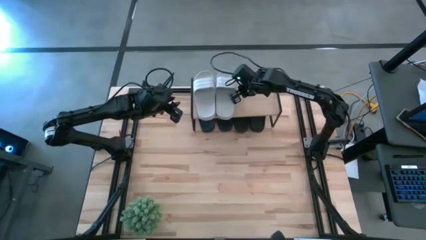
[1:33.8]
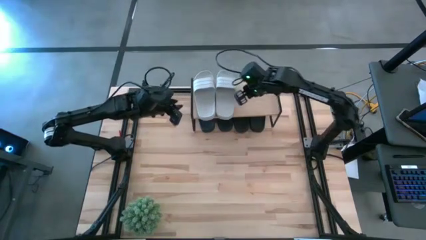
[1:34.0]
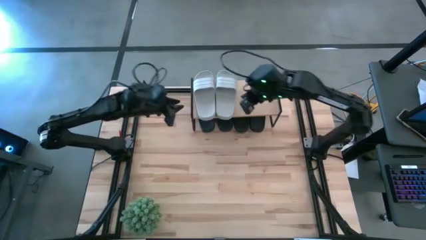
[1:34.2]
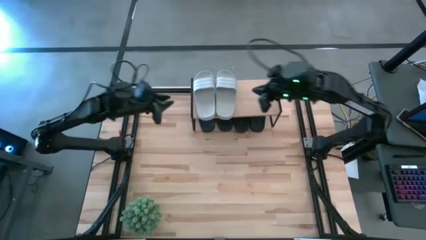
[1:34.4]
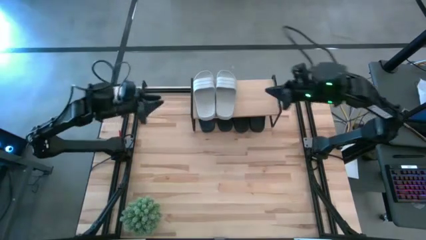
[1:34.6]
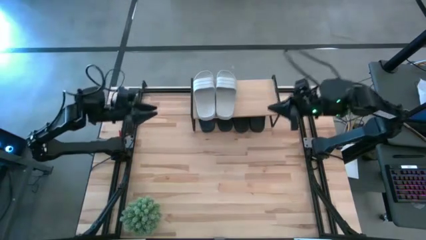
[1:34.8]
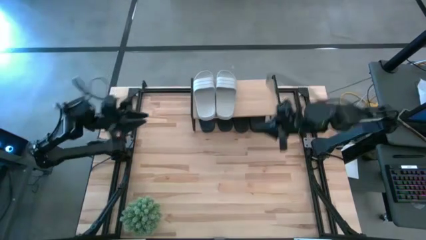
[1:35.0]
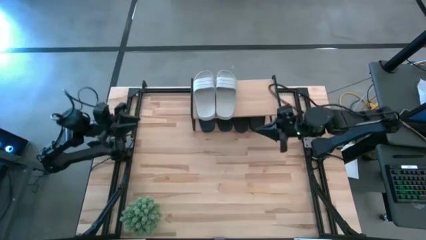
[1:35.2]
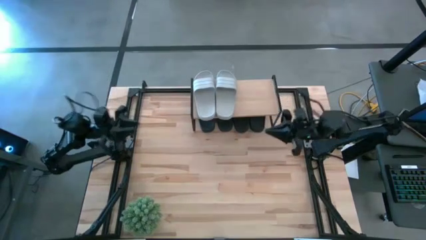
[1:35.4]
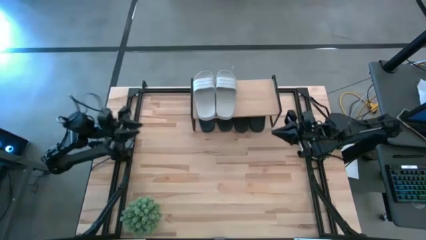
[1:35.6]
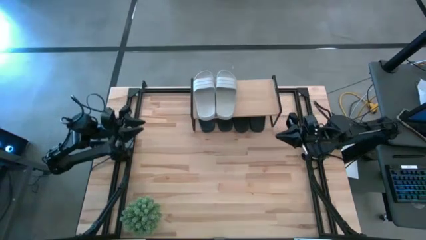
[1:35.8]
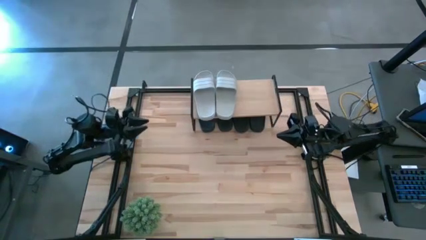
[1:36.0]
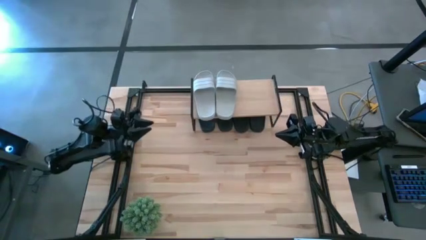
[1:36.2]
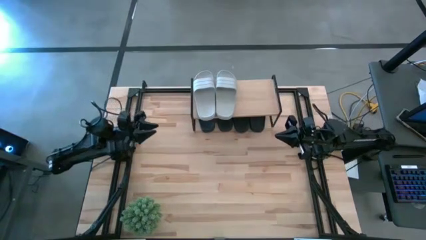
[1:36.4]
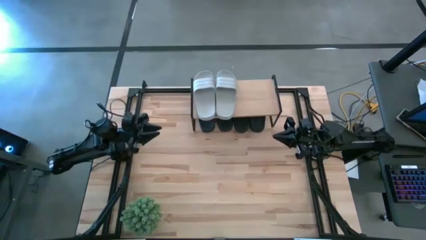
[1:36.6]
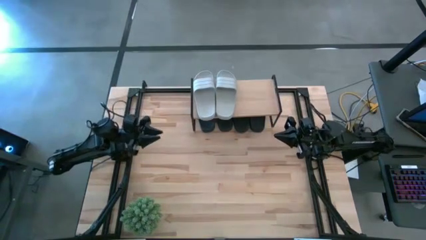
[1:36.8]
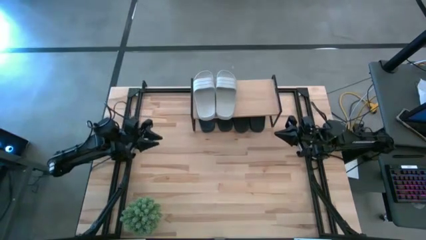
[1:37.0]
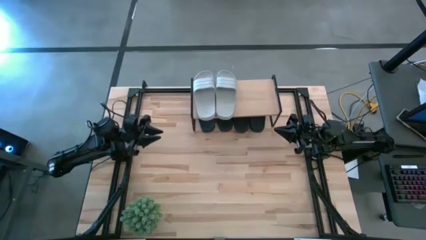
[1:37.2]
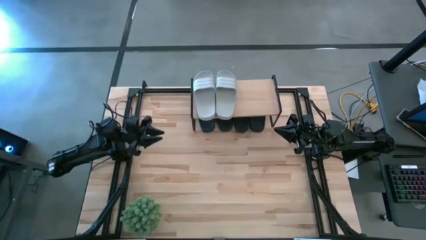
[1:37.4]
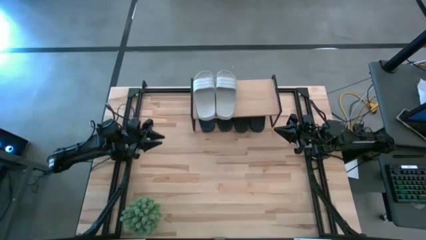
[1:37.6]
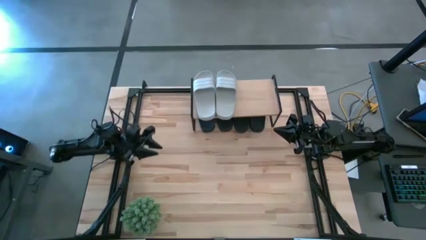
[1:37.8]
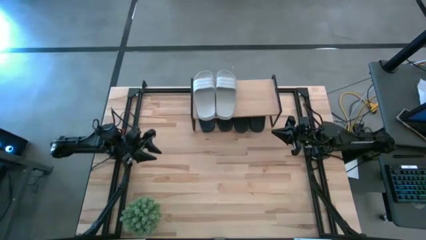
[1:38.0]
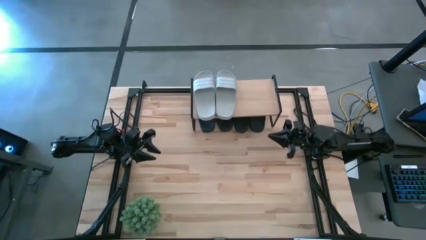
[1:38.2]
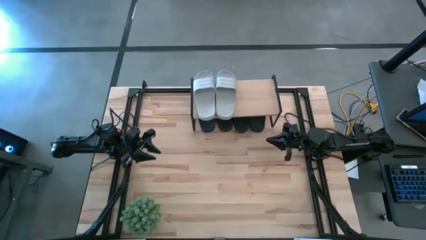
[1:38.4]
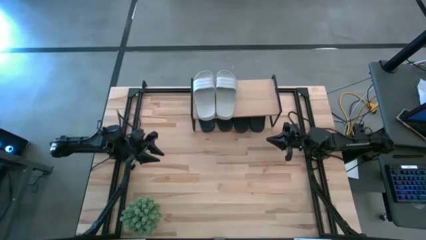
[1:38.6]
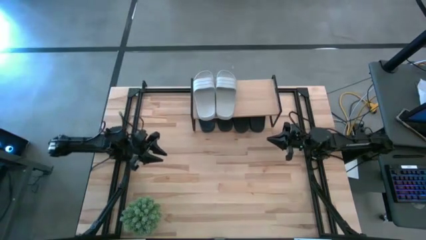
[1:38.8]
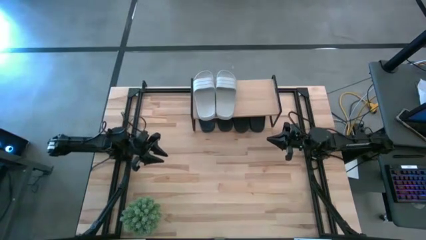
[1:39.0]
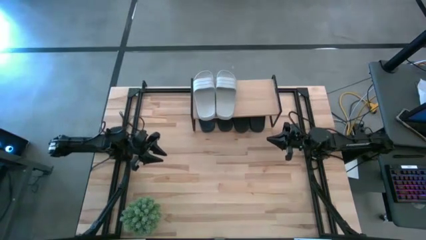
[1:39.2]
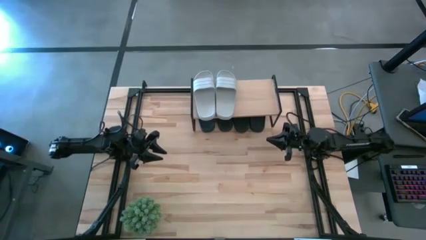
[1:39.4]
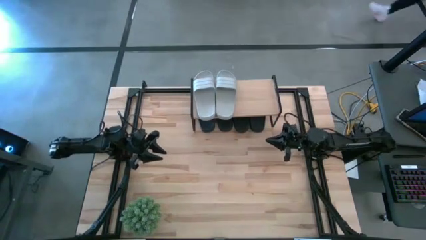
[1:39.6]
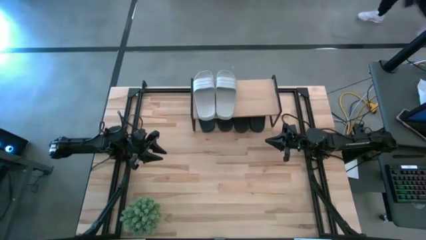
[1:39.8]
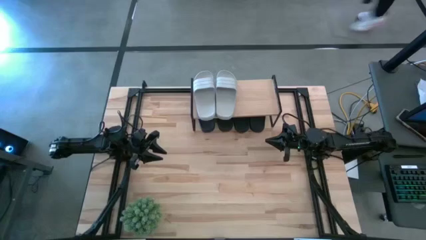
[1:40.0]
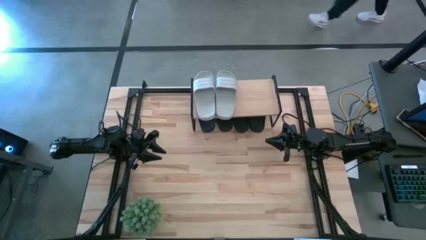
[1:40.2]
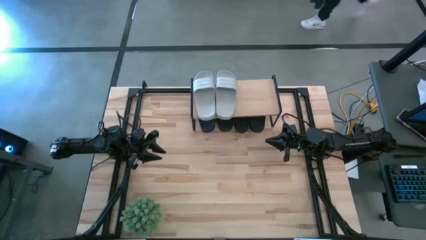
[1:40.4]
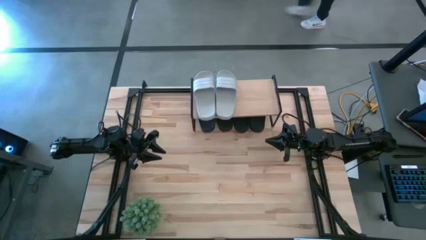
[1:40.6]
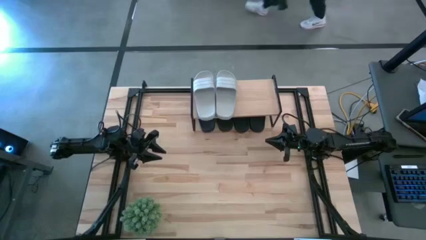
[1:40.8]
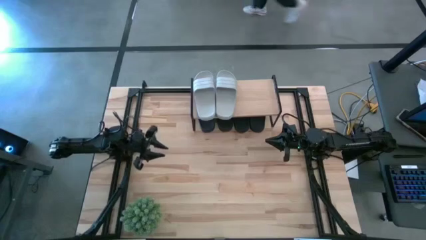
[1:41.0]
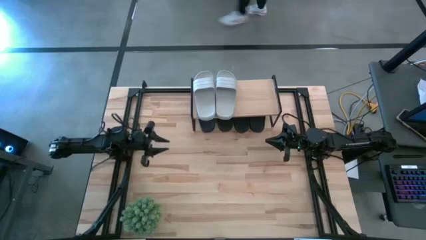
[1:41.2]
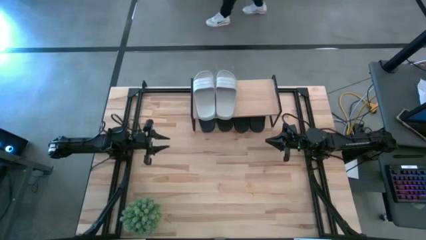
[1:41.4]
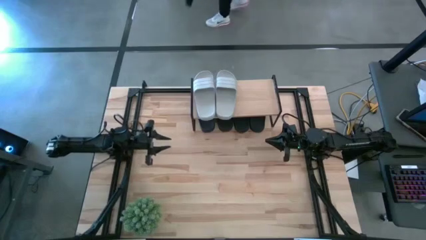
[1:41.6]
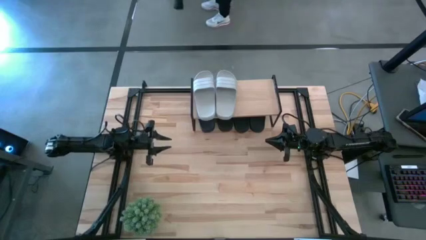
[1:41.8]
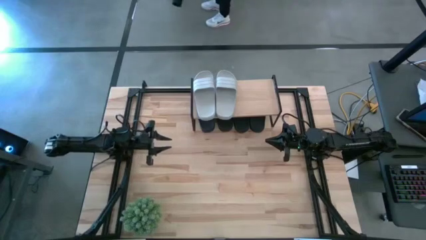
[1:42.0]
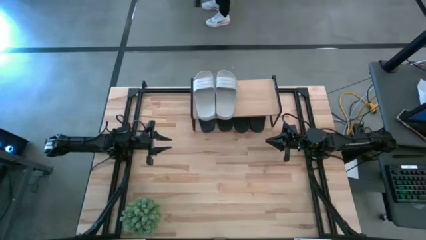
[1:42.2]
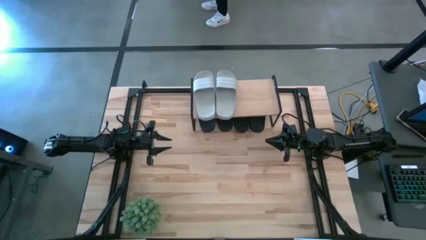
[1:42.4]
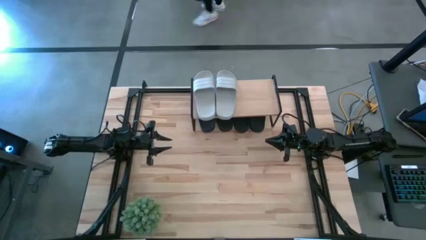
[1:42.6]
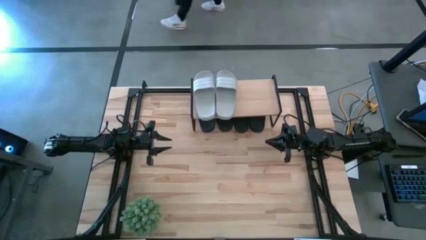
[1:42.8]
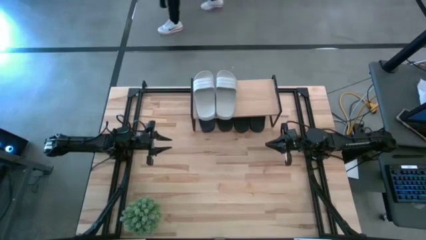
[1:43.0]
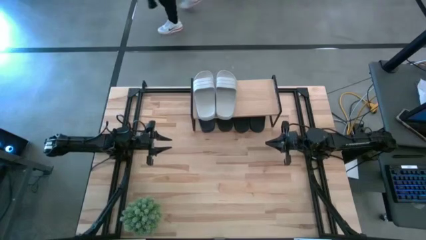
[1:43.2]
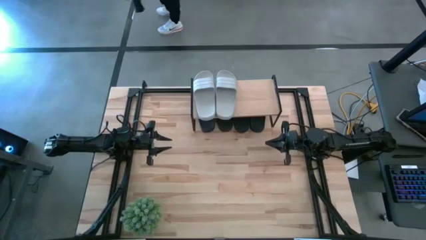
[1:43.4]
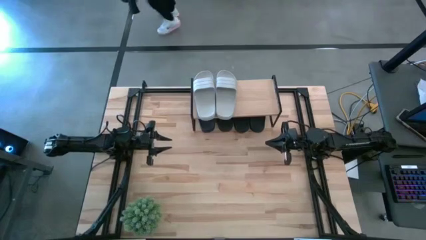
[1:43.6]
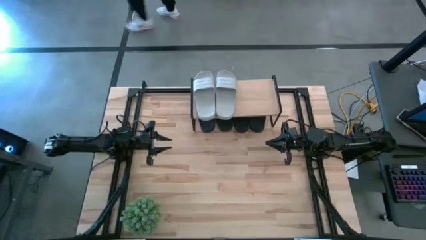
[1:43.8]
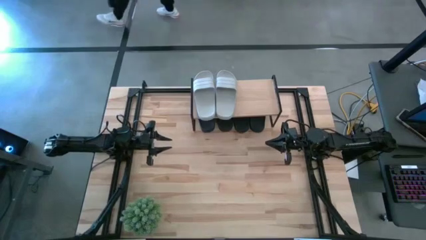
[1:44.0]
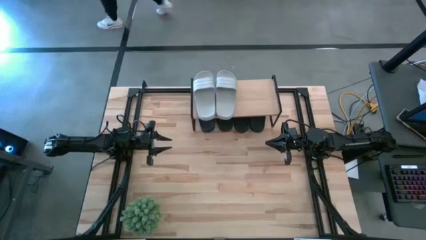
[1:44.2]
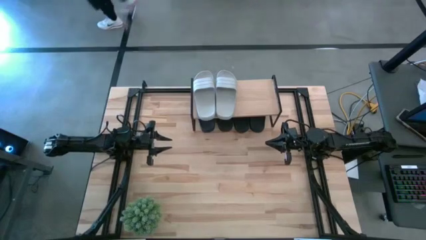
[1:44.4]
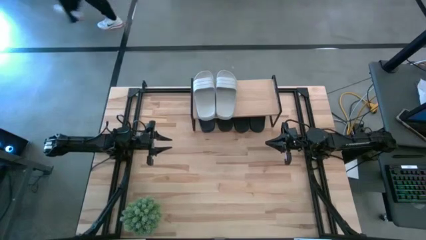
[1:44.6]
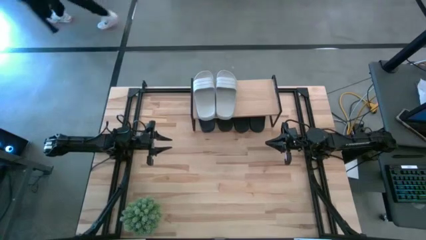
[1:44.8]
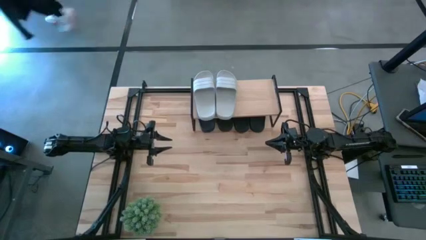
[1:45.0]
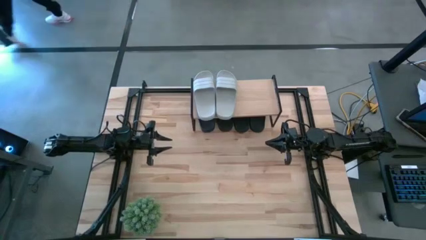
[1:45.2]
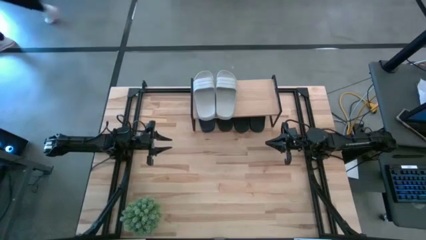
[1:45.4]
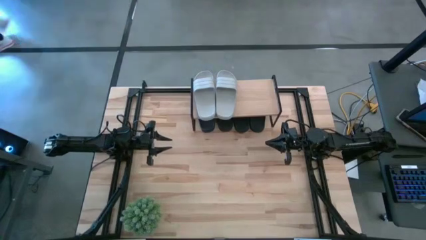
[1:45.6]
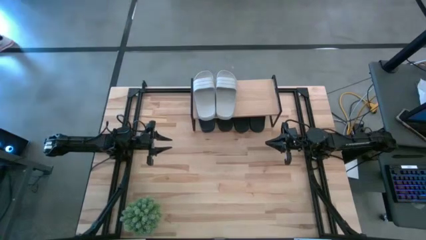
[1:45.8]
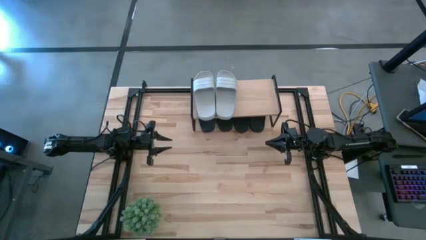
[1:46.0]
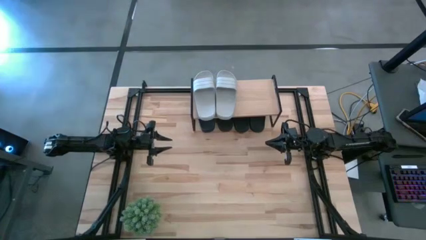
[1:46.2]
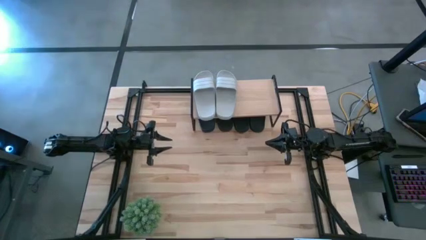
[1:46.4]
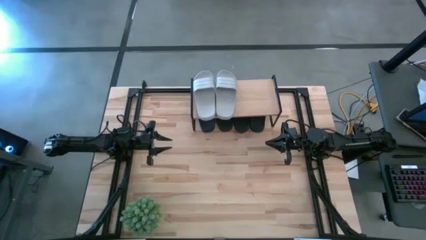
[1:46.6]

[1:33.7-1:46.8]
Task: Pick and place slides into the shelf
Return to Home Position
